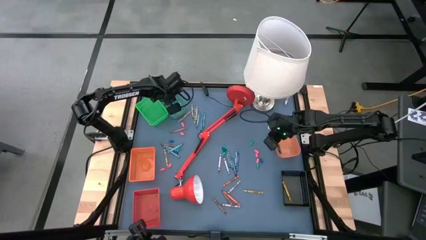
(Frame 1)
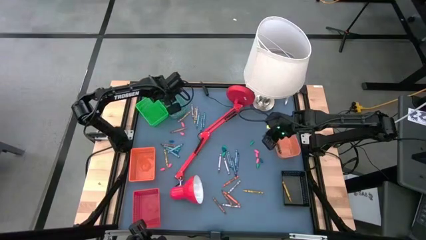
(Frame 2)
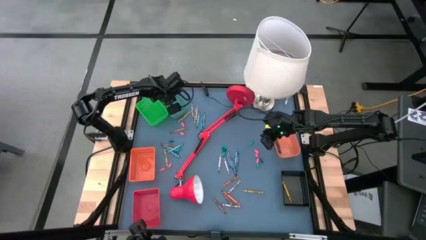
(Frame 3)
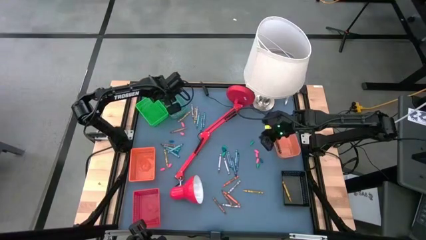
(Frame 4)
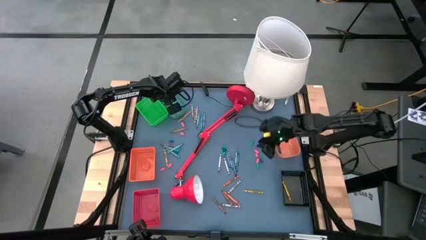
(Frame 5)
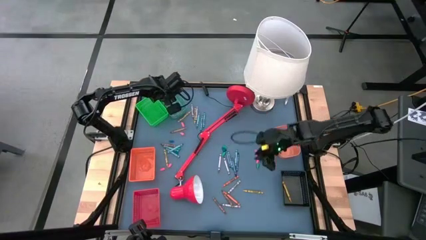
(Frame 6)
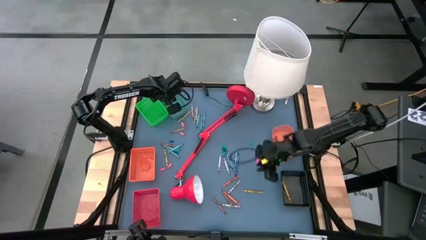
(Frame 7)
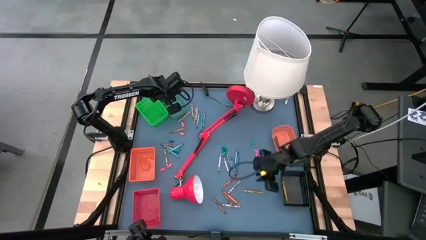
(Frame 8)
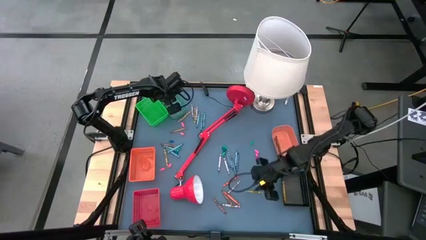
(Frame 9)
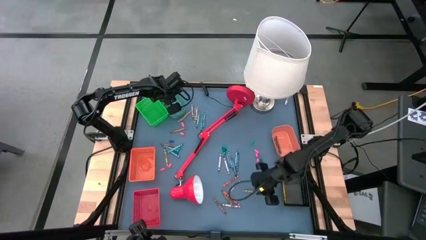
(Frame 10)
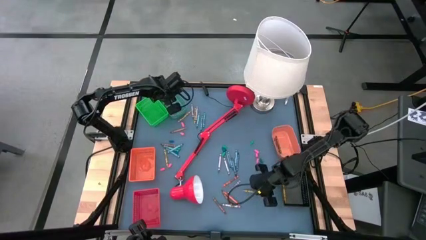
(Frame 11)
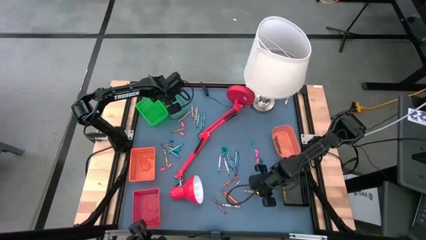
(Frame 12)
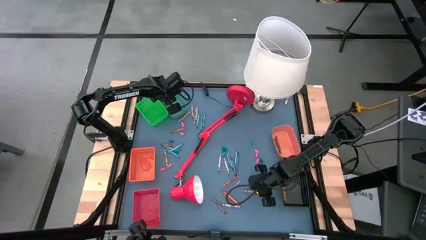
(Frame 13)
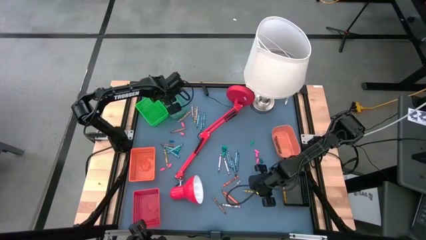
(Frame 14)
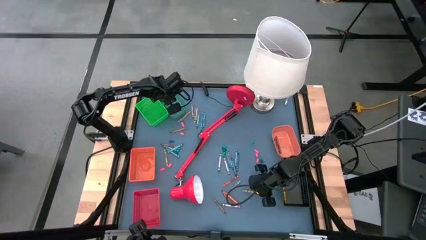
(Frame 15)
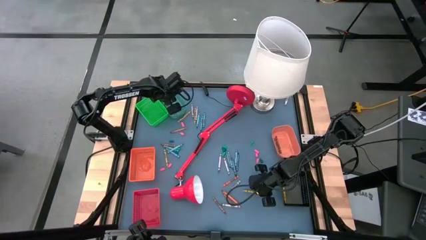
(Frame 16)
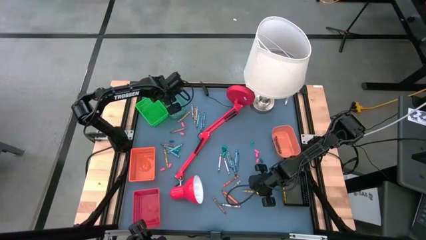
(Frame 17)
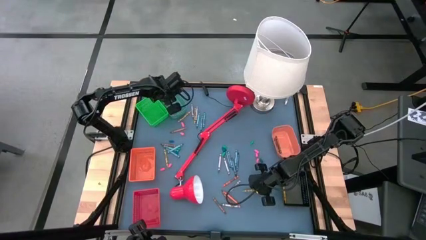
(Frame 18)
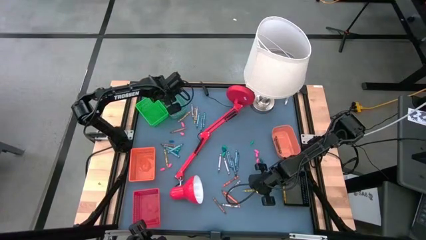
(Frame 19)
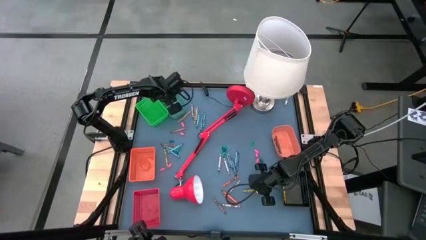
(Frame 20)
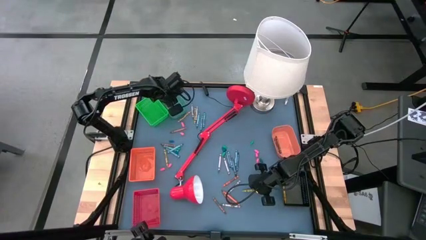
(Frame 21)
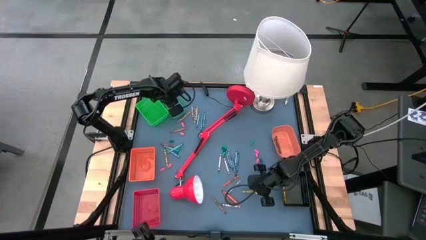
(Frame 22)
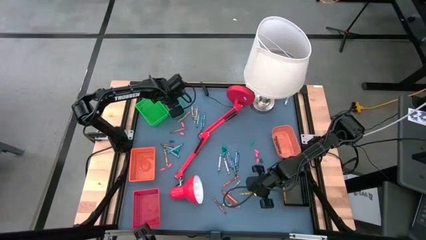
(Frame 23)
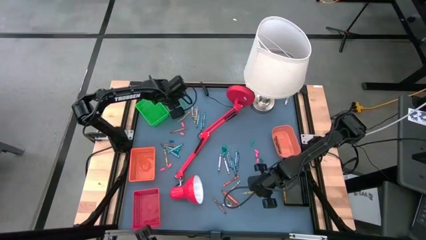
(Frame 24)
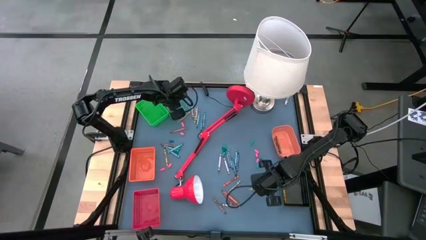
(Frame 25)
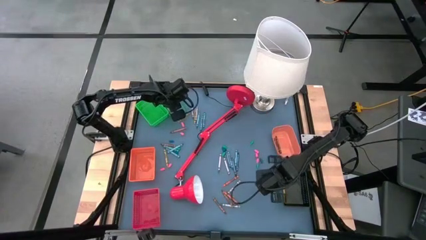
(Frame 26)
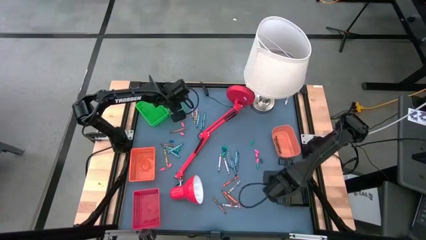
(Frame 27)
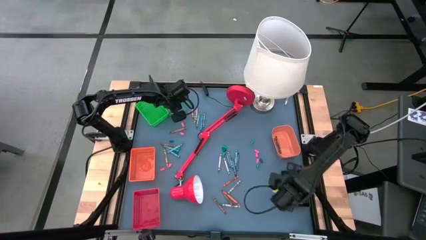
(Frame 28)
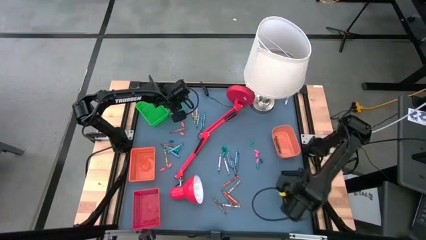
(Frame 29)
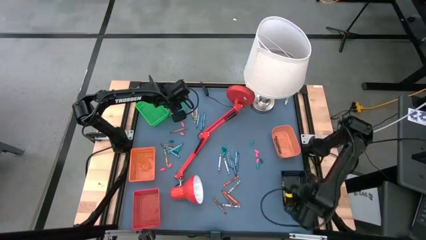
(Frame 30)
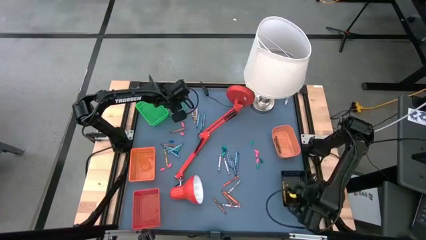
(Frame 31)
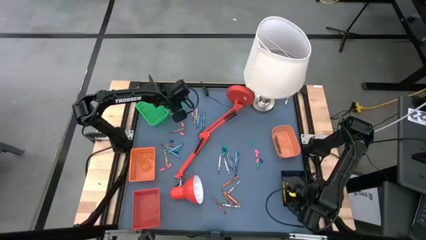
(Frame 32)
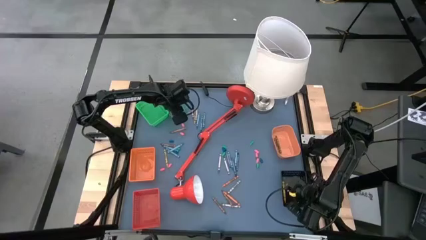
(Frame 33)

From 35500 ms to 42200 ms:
Task: Sort crayons
Put the yellow crayon into the black bin

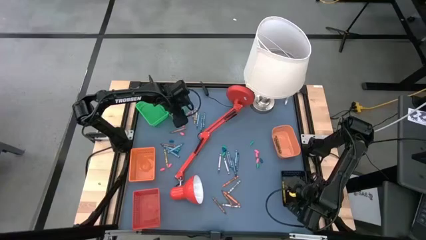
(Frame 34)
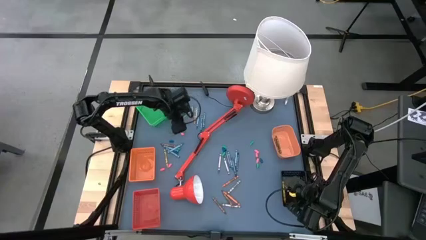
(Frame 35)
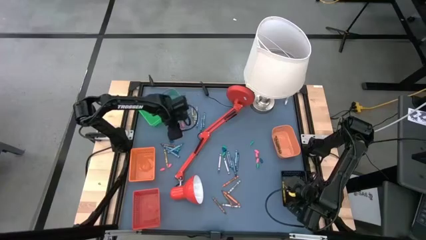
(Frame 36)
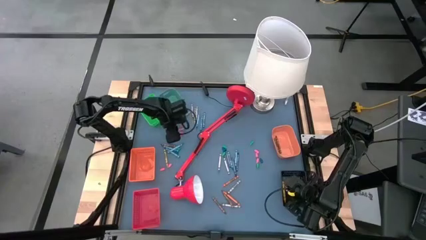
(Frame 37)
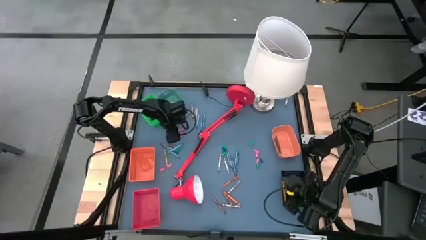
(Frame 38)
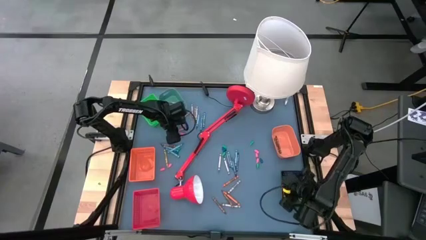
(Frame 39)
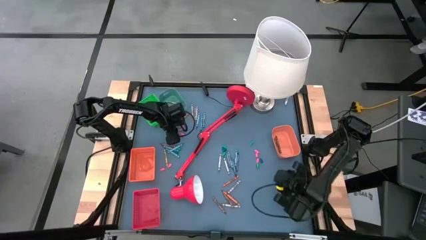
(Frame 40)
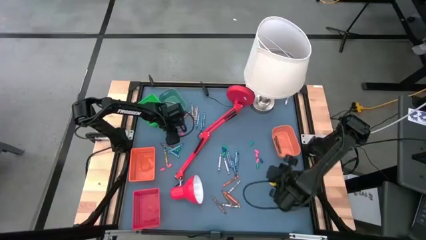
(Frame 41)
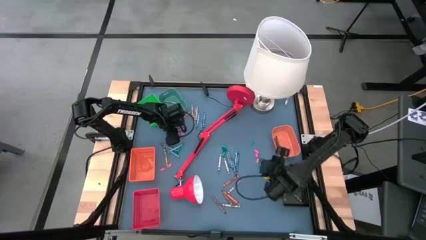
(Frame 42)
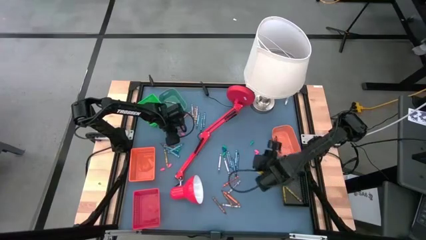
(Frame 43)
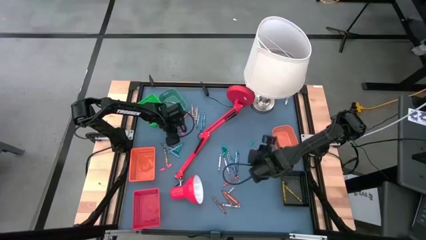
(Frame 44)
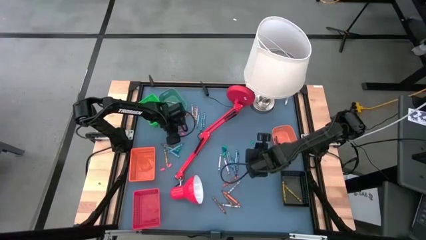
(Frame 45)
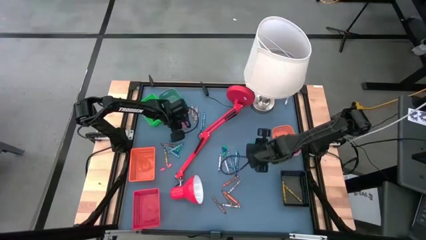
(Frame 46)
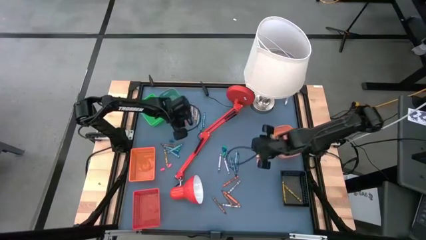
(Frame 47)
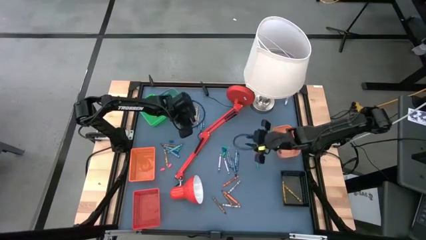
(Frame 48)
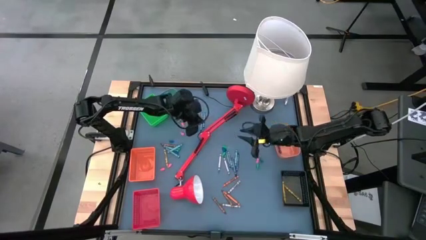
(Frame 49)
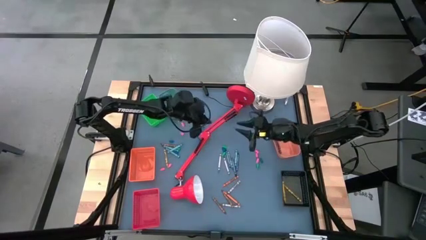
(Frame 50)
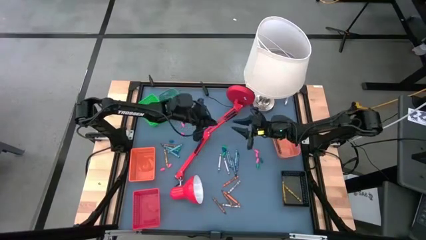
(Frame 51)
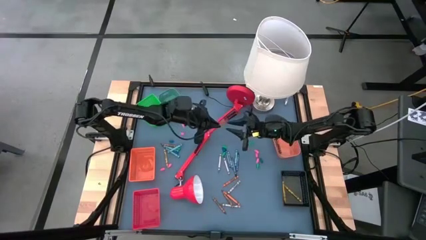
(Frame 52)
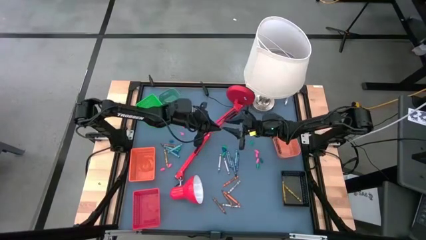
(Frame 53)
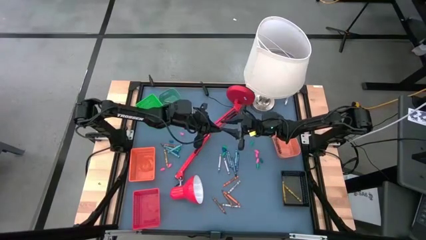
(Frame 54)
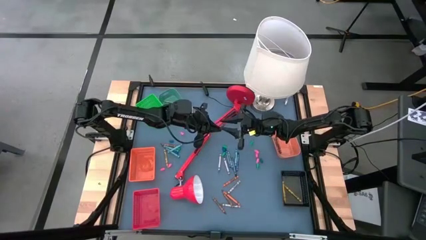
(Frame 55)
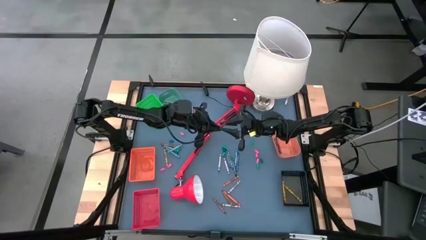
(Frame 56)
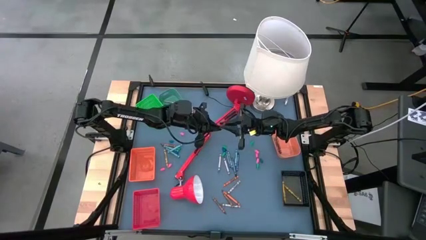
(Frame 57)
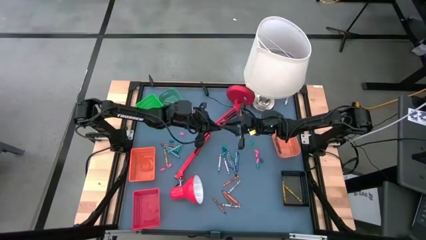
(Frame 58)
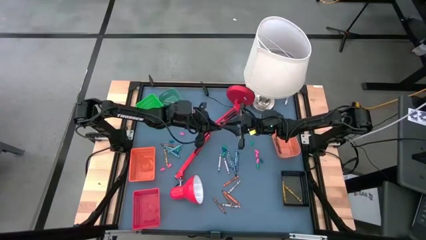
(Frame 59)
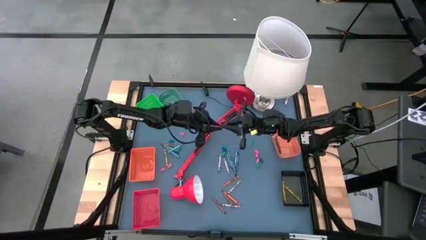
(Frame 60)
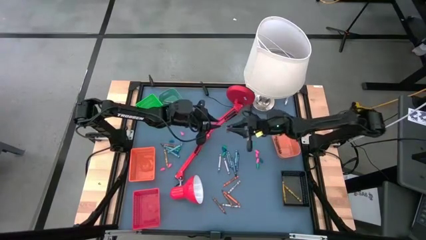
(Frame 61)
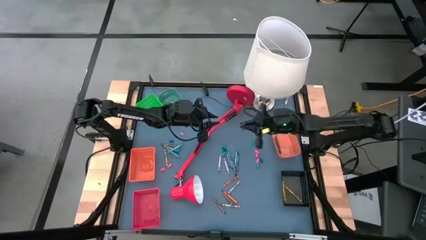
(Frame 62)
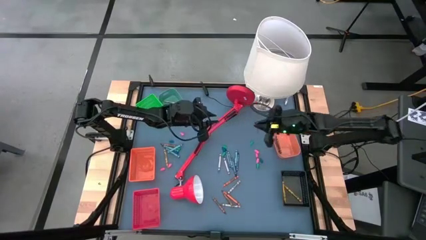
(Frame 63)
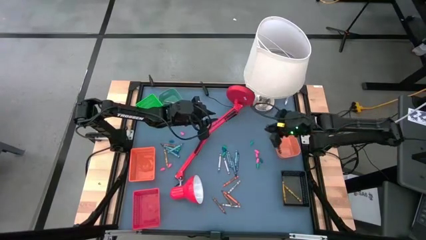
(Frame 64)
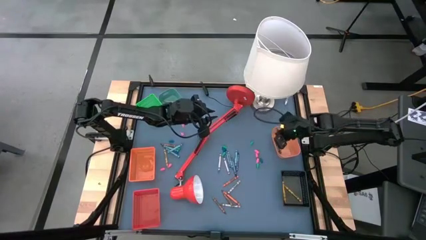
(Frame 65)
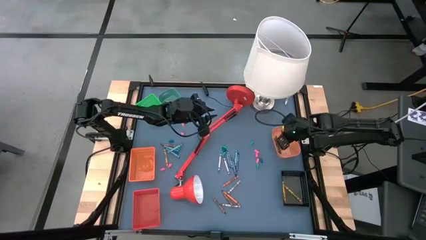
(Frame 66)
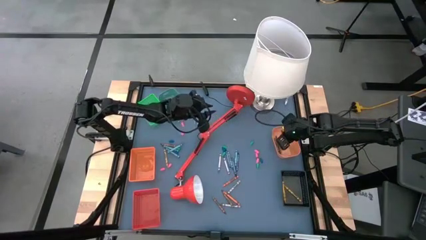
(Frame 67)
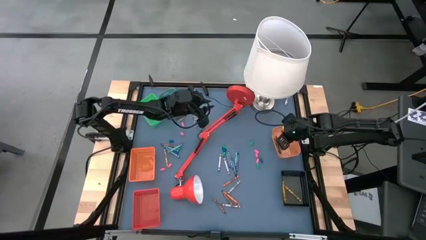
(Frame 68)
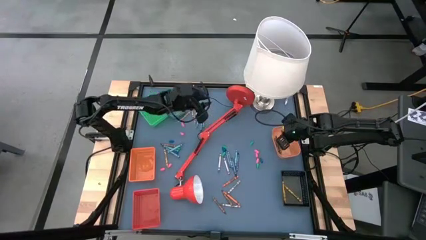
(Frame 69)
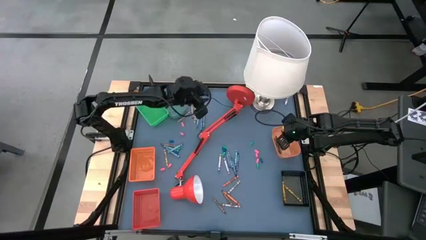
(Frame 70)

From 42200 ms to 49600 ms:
Put the brown crayon into the right orange bin

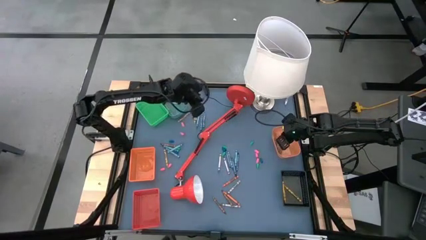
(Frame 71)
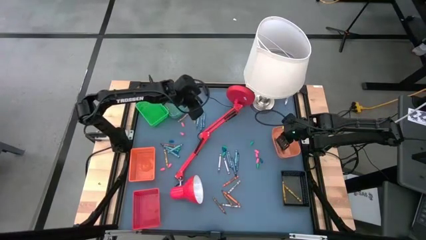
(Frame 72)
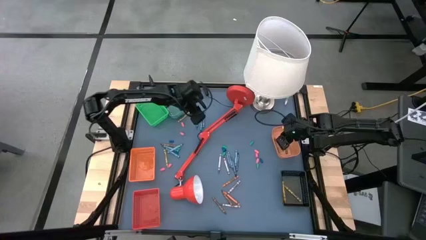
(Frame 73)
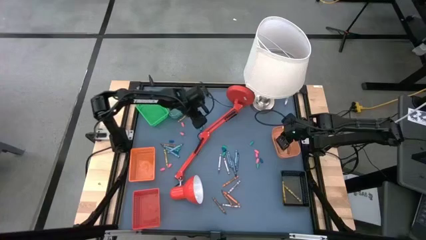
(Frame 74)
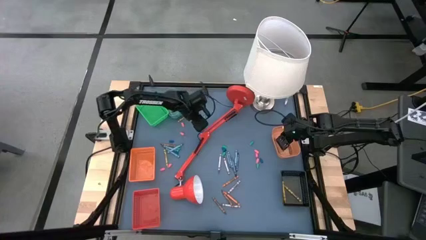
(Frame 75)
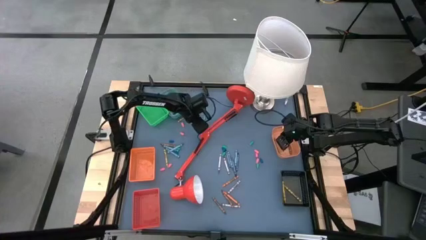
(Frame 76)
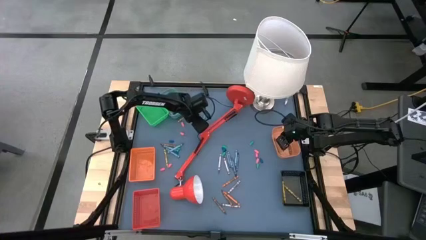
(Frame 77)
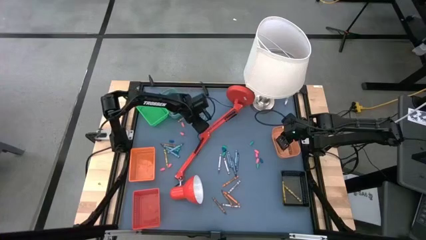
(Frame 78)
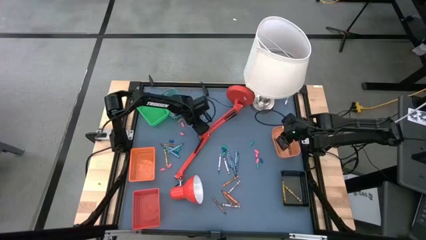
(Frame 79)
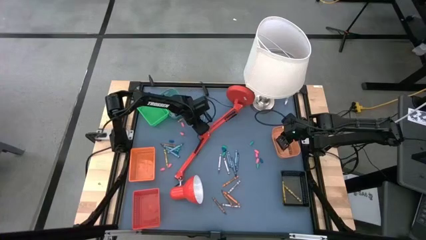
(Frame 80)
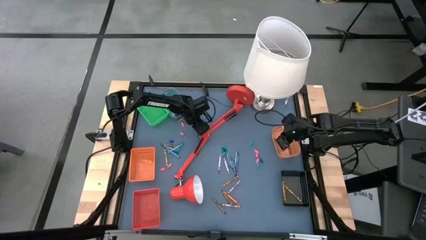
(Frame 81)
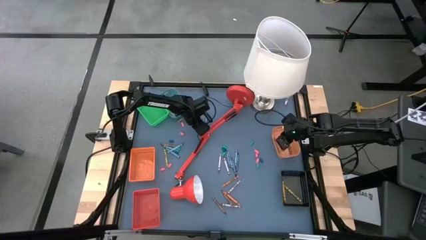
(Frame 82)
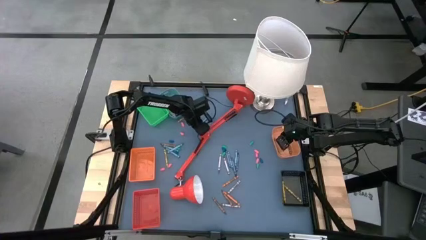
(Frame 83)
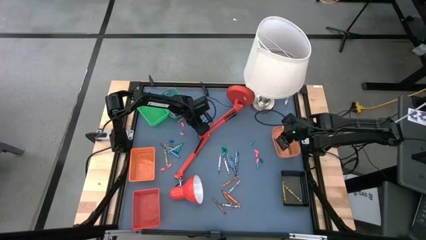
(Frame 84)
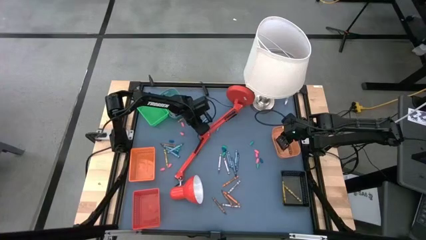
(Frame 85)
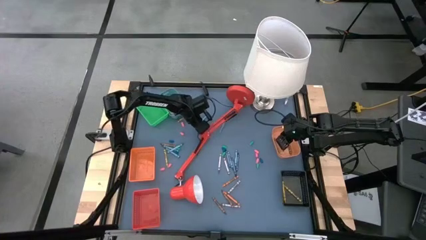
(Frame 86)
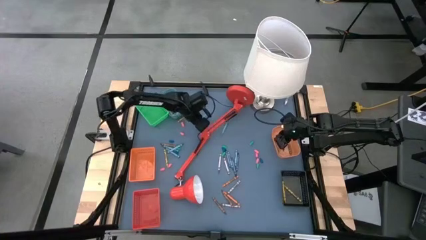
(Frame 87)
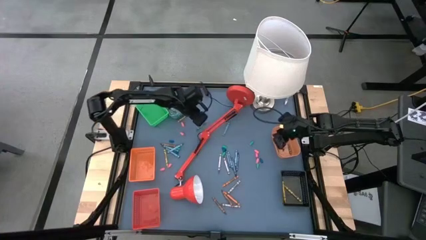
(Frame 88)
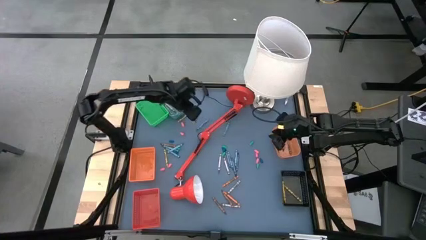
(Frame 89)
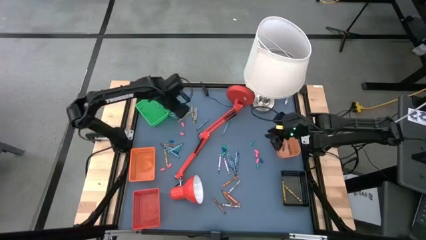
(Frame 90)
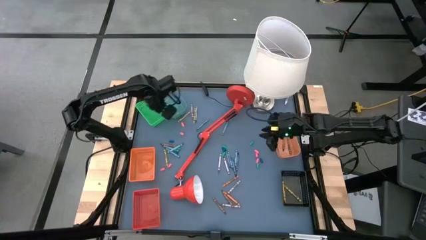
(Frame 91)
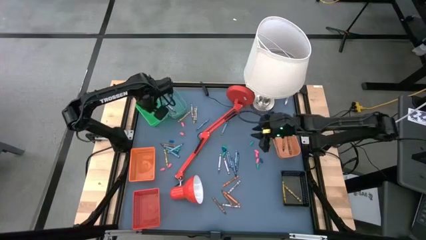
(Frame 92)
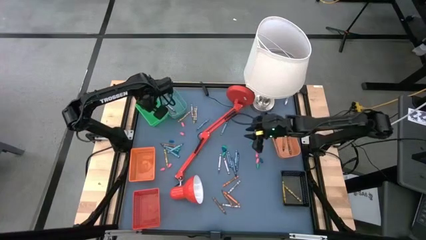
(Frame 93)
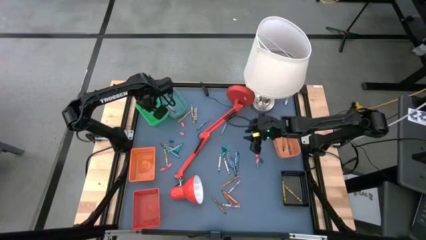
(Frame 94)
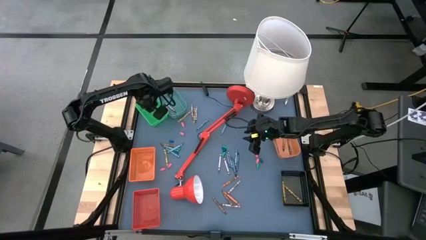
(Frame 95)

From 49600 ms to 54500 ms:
Put the green crayon into the green bin
